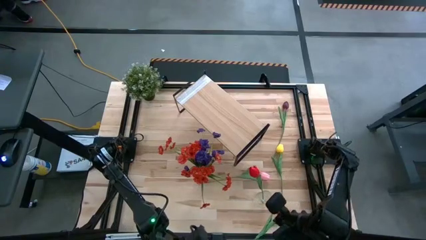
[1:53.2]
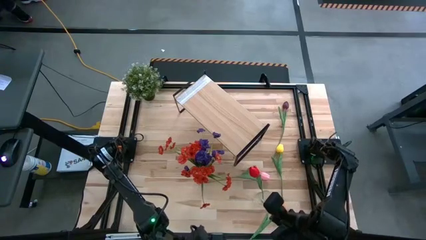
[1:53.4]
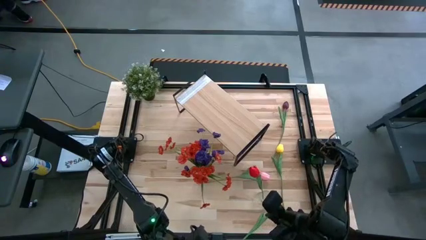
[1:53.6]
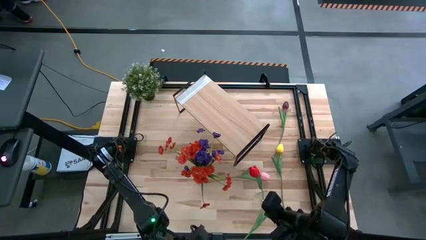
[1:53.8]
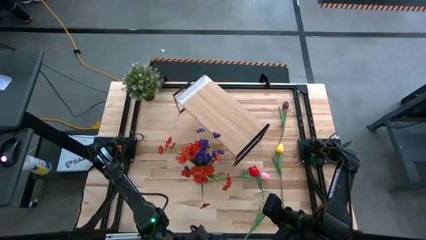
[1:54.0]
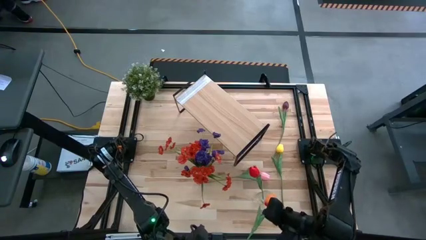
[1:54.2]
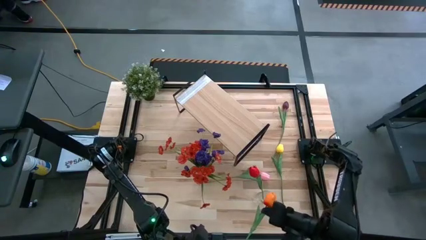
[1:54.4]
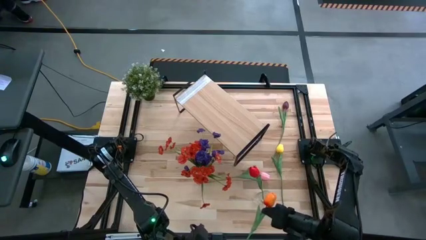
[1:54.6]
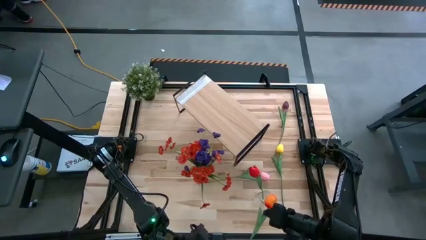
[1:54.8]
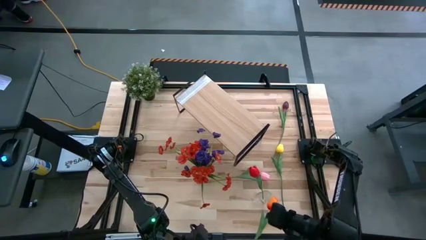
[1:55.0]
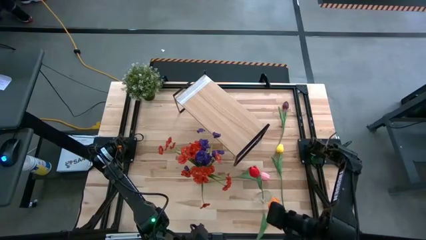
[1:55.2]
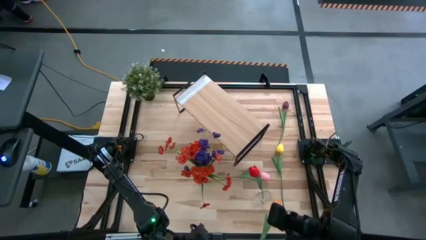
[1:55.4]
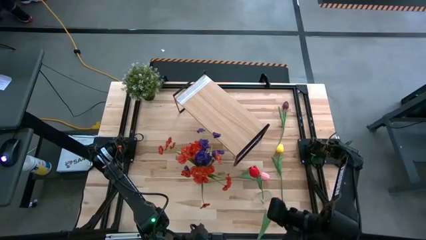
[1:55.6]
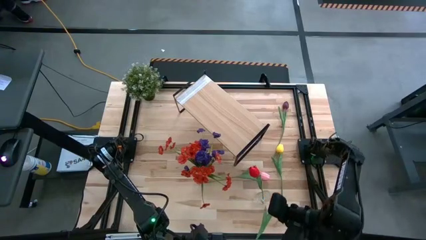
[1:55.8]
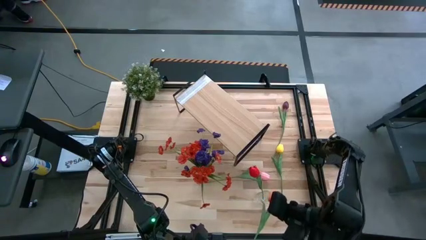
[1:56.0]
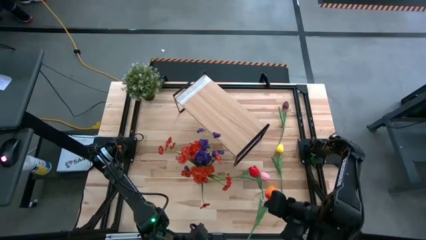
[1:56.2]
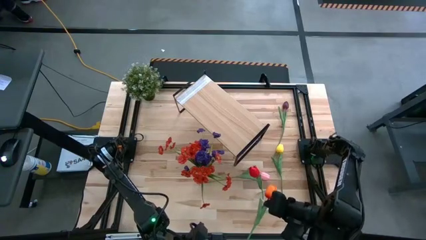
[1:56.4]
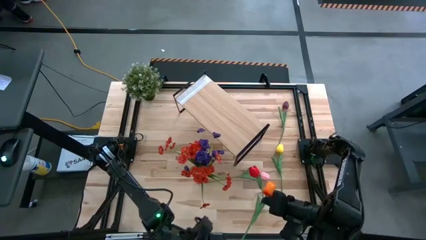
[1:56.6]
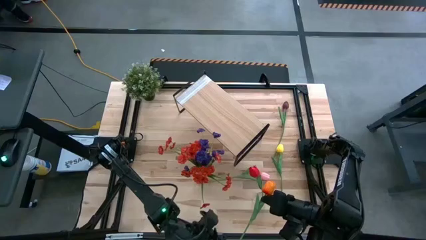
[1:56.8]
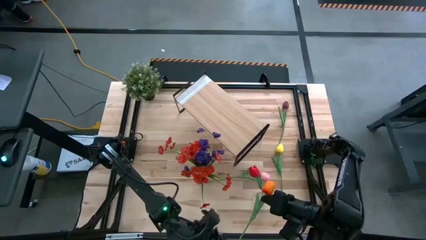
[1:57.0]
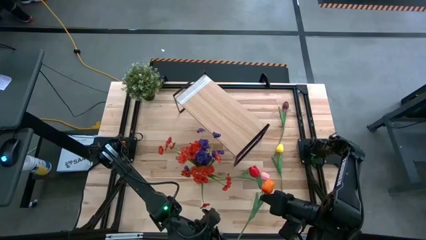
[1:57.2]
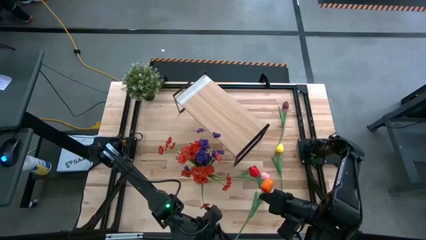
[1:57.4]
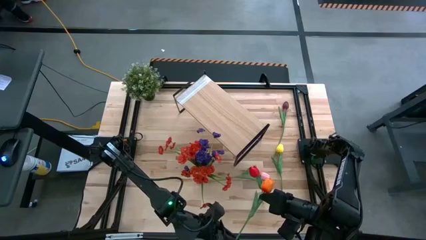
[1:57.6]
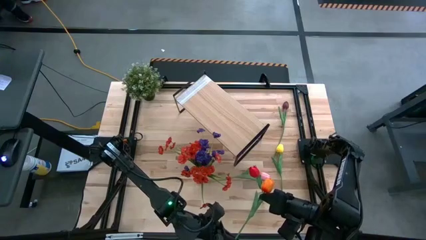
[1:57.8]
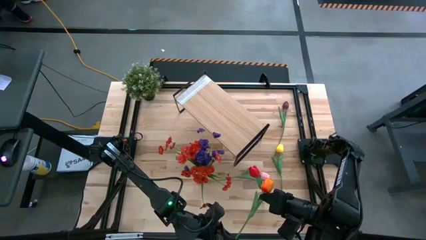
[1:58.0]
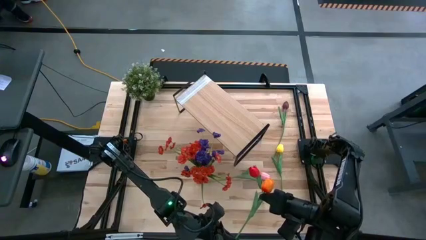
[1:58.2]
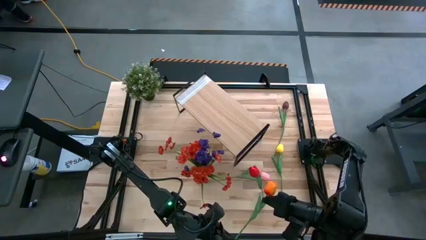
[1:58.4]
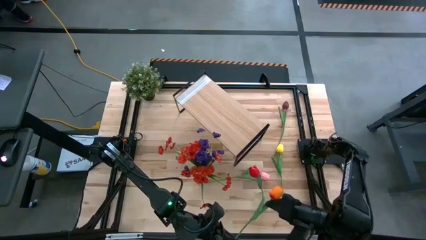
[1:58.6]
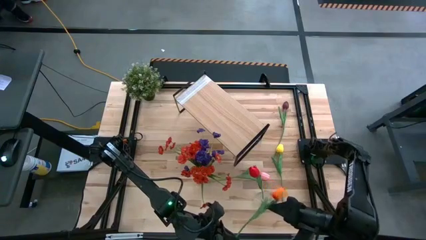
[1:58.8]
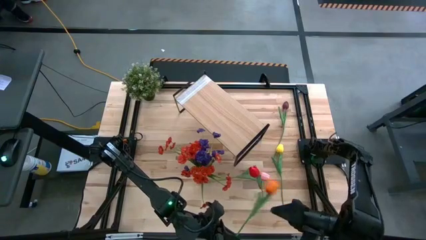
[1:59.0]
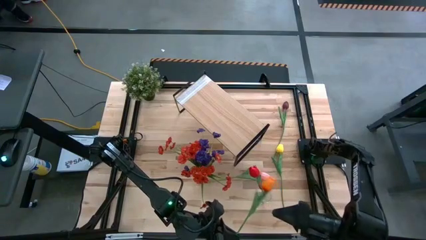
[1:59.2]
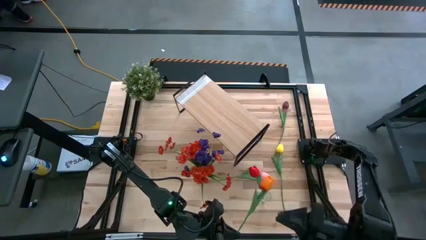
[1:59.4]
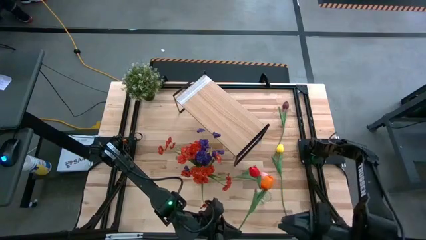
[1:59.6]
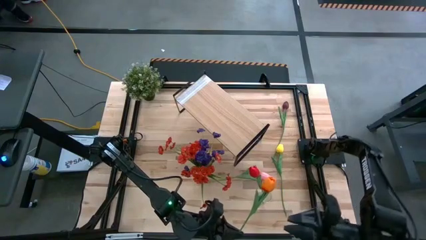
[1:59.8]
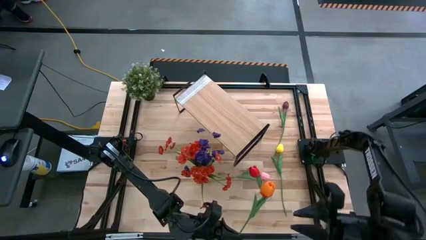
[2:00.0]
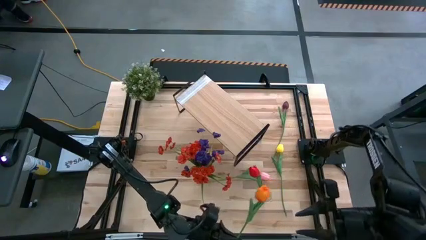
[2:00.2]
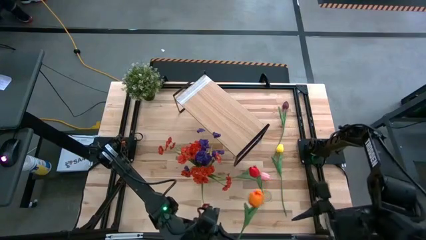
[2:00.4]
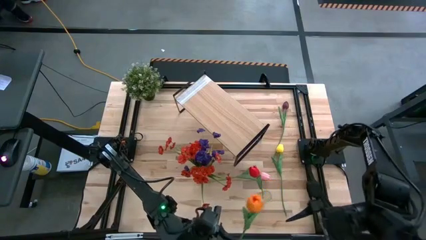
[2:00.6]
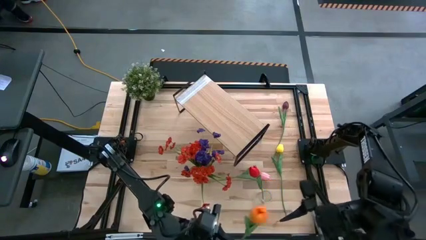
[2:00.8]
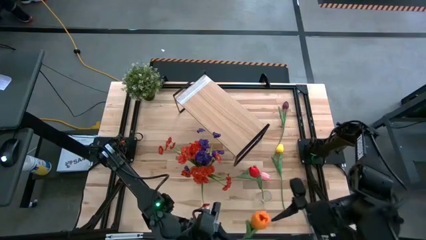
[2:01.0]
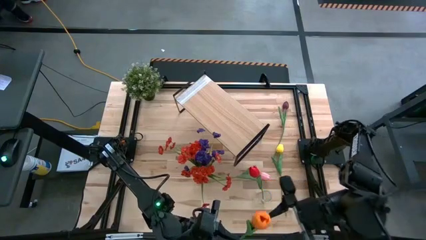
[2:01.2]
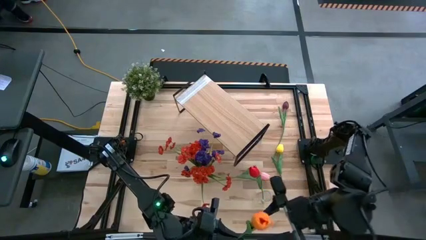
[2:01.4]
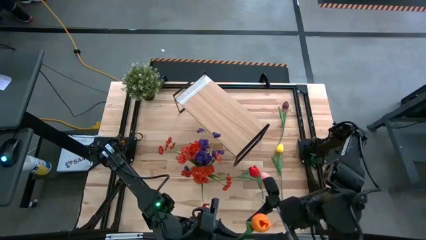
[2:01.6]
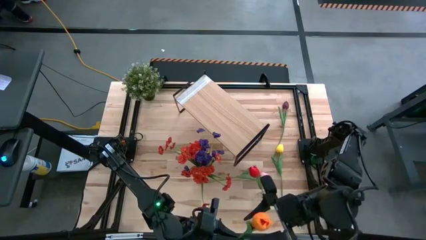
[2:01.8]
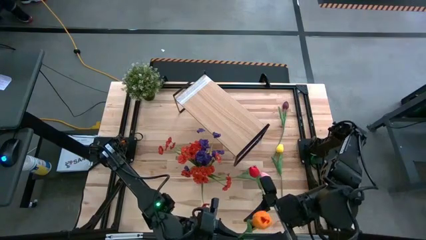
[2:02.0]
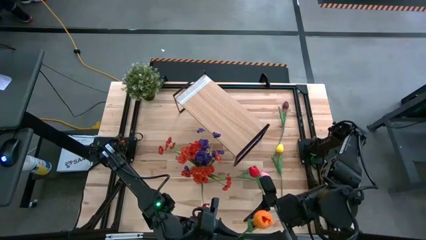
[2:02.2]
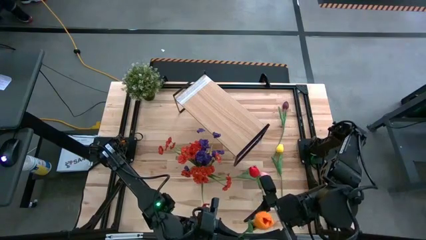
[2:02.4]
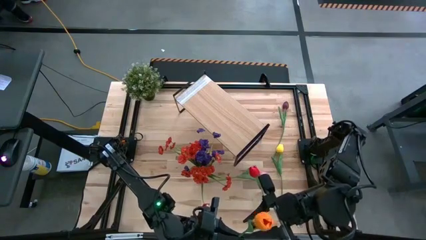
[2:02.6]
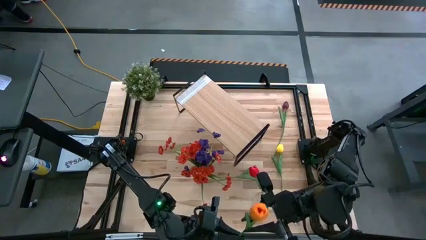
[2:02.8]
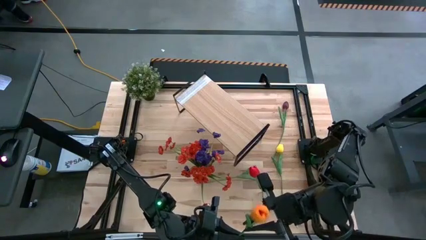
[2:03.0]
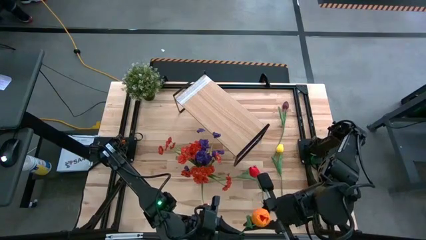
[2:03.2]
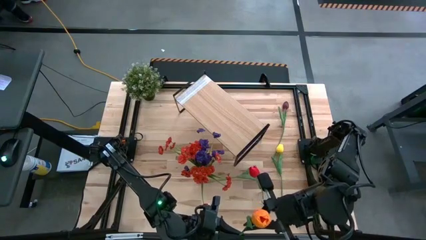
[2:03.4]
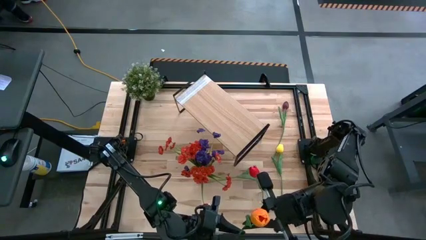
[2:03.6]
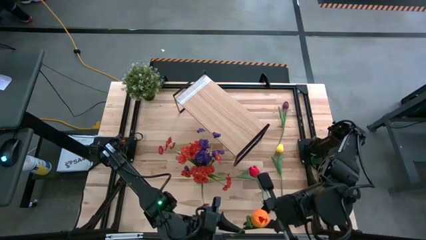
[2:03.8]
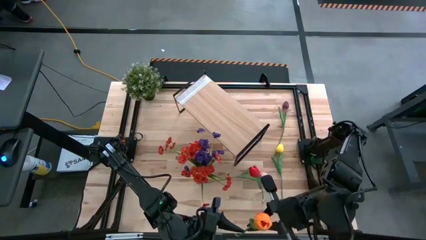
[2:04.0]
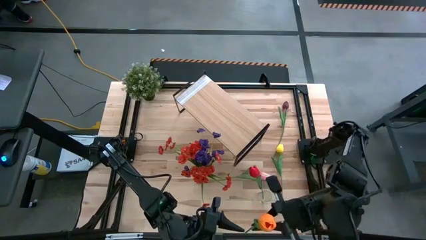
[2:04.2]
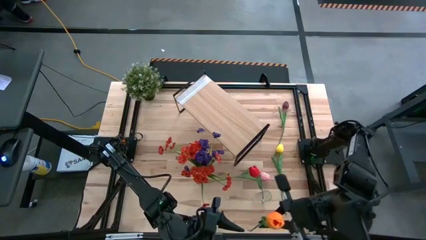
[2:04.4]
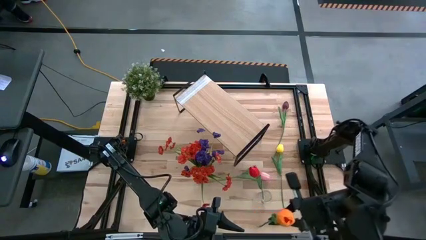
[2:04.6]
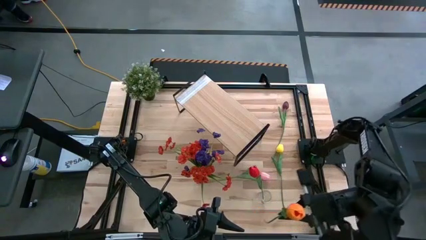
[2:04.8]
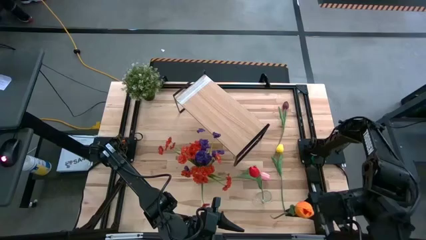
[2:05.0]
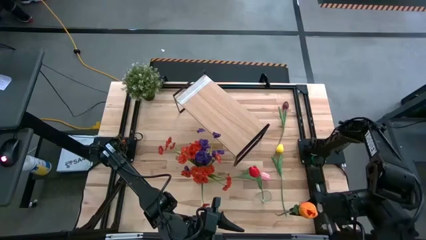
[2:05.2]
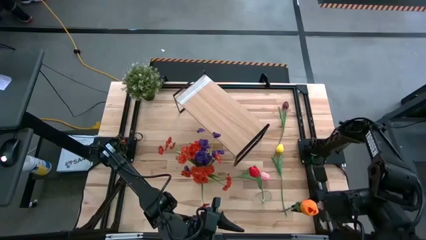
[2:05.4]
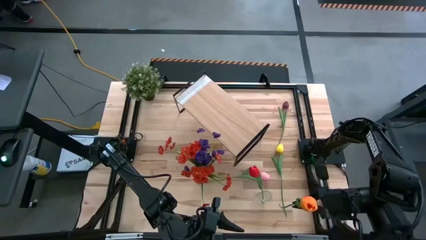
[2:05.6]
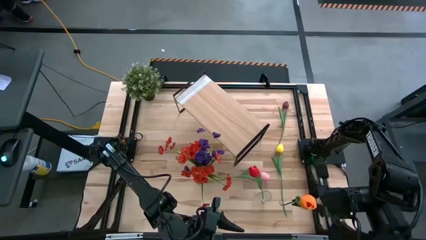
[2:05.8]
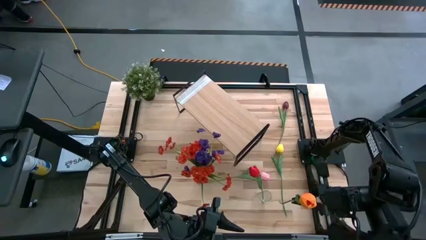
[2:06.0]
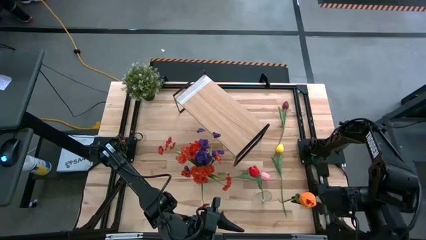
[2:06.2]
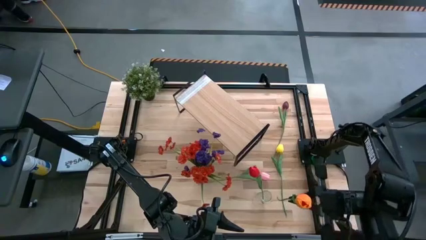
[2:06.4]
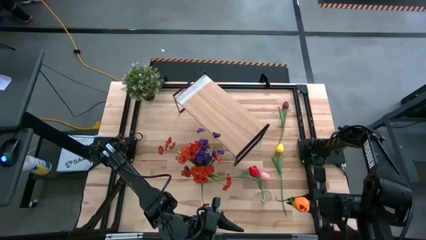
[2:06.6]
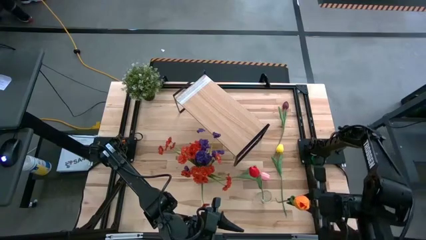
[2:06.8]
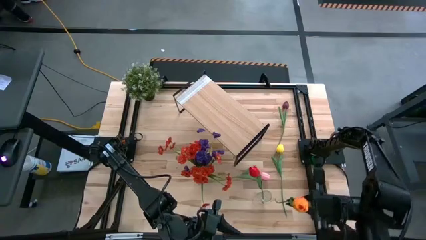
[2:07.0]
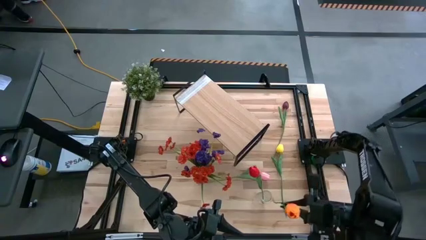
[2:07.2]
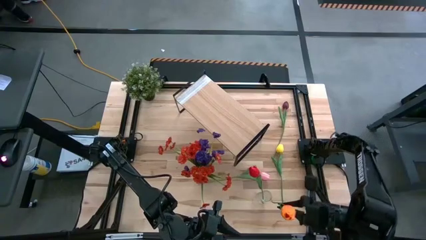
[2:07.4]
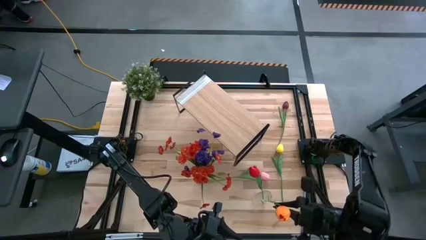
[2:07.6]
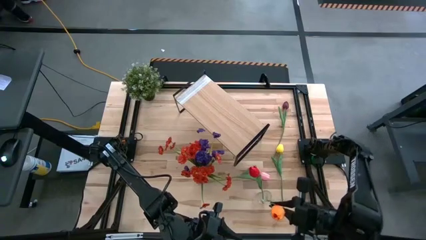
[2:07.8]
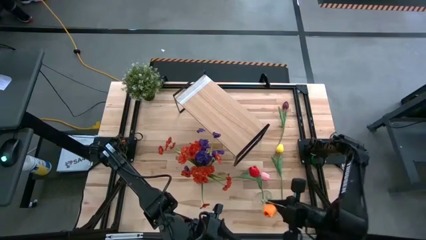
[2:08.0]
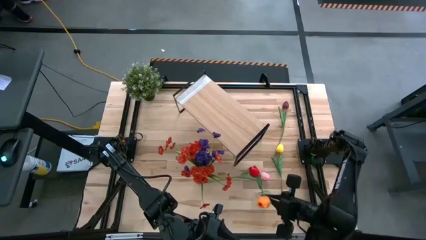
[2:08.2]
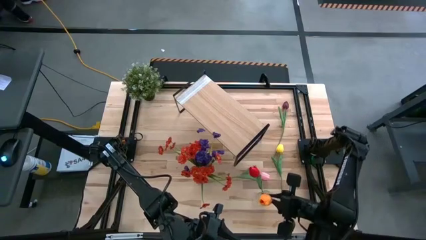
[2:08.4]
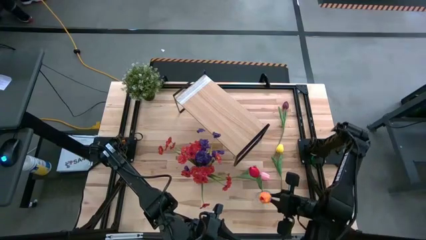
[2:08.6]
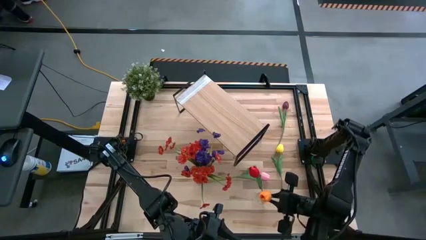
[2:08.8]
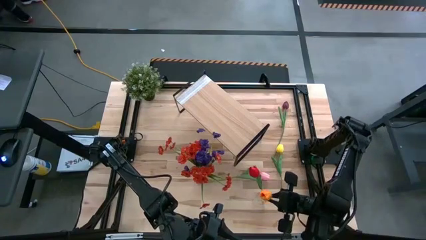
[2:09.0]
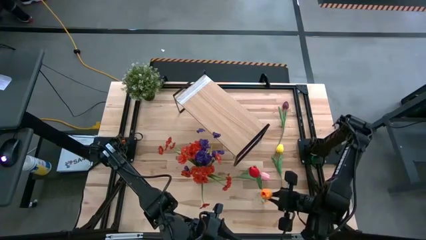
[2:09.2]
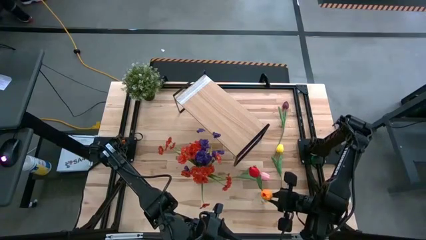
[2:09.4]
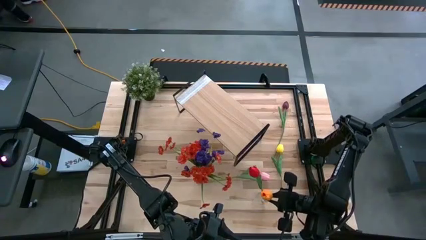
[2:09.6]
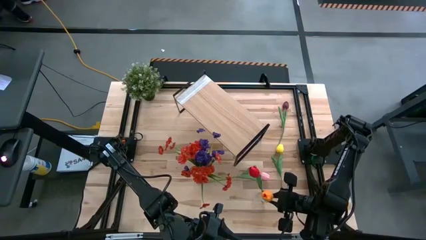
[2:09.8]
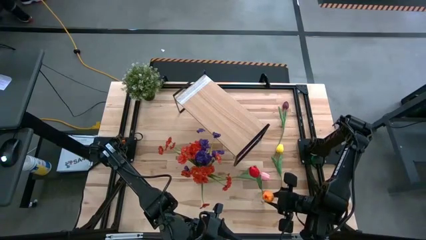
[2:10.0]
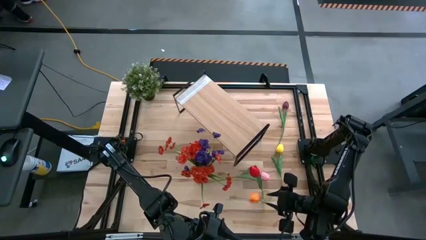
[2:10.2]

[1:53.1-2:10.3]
Task: Pick and place flowers into a vace then onto a shelf
Put the orange tulip into the right transparent vase
